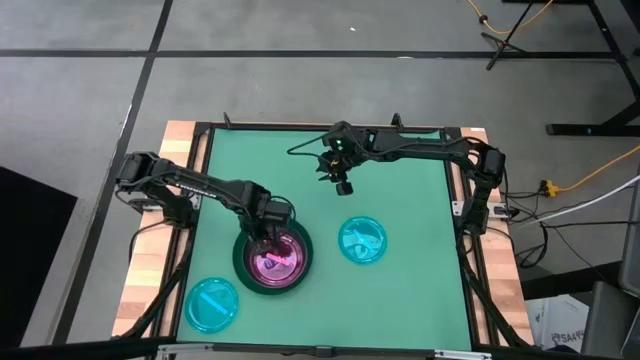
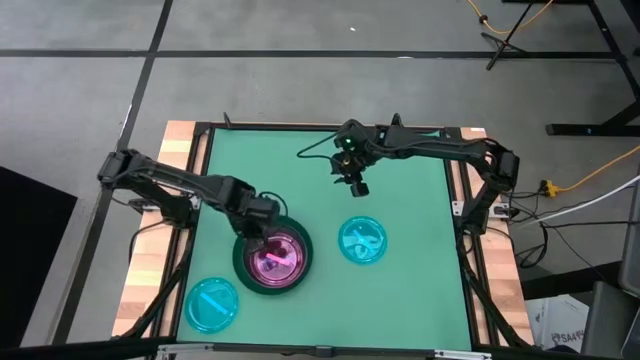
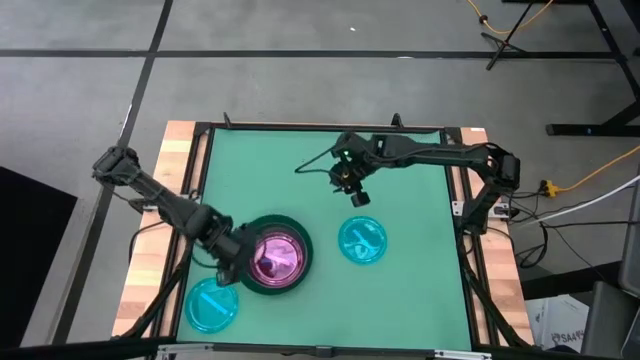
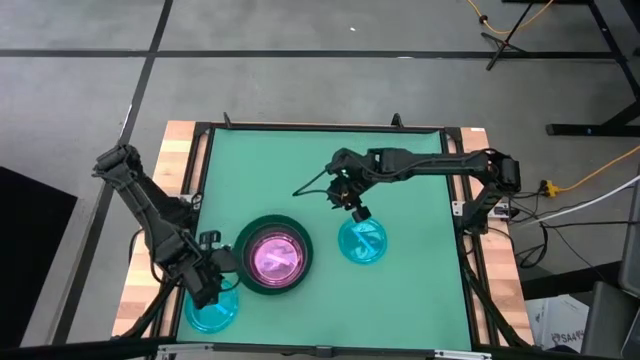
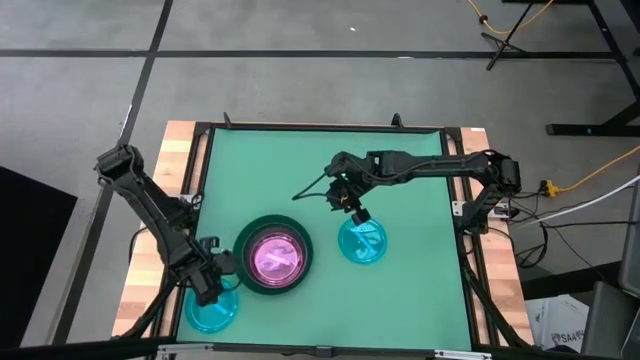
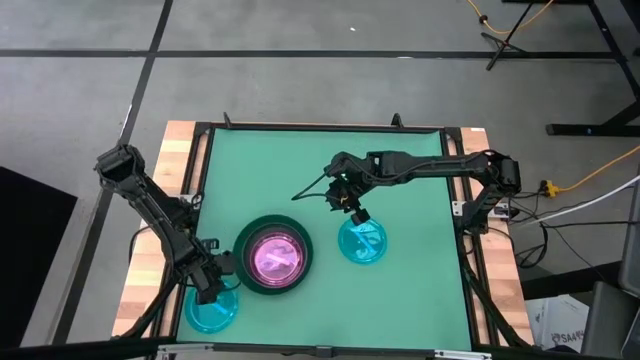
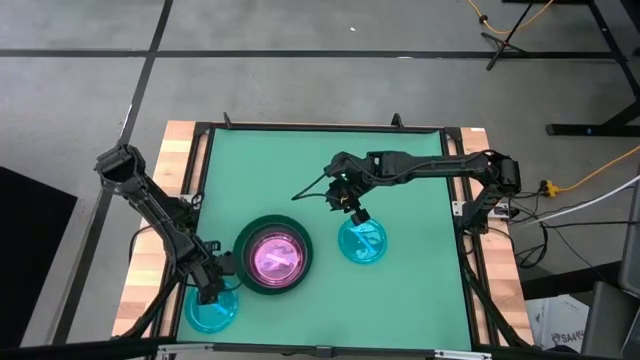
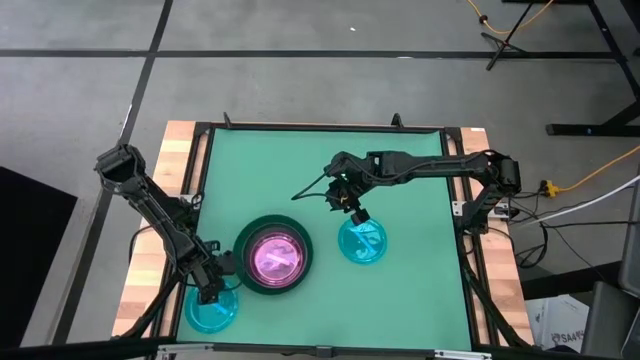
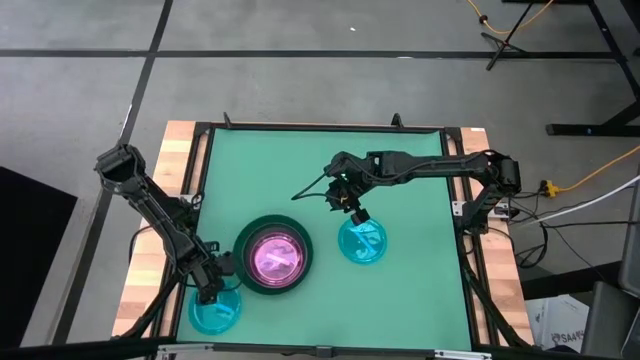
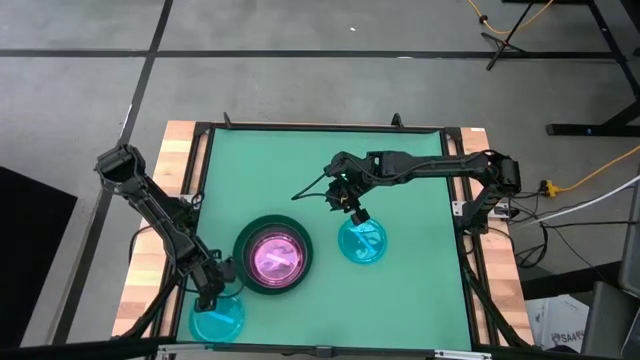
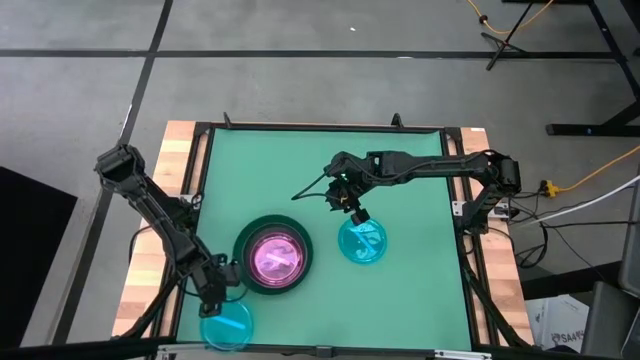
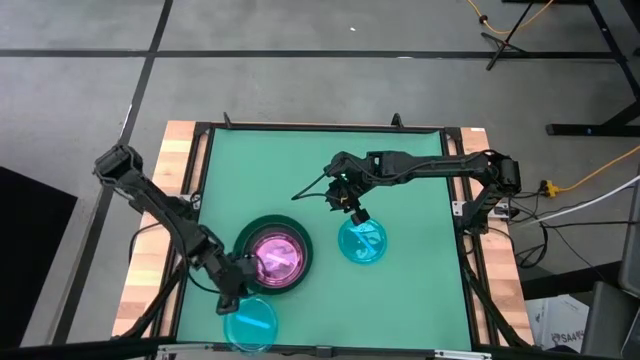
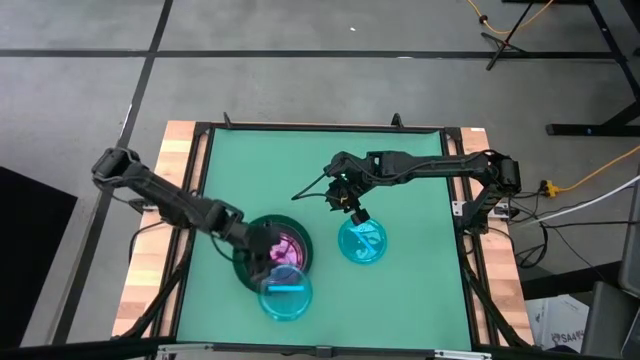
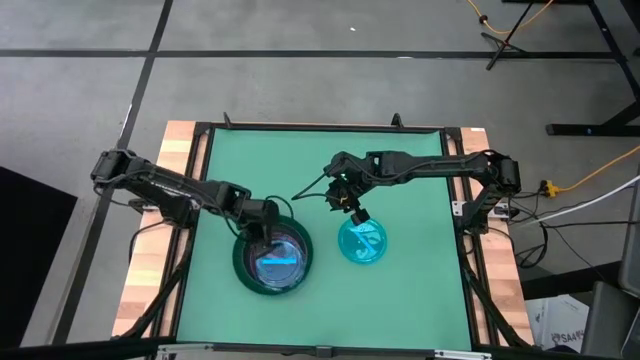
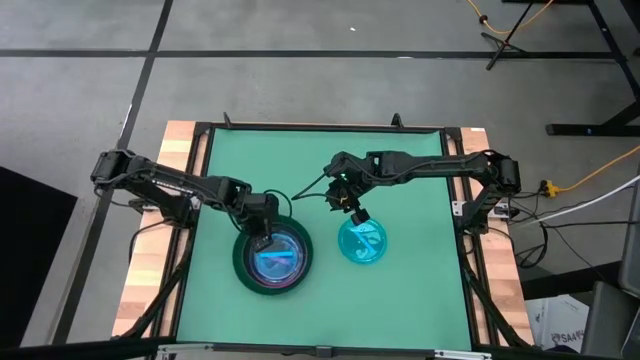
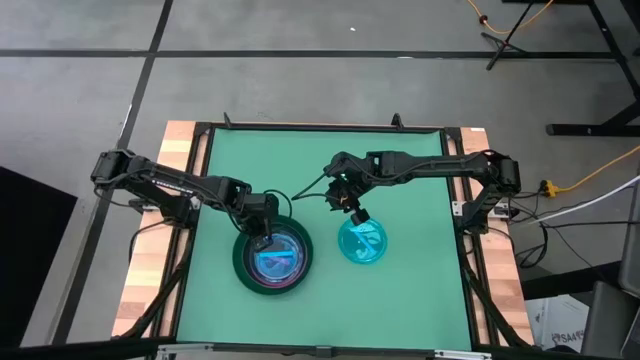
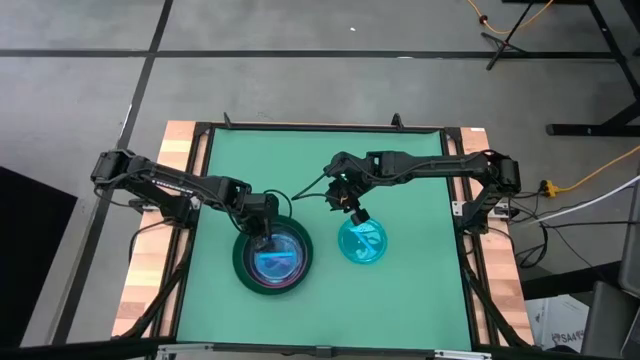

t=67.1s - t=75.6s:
Task: Stack plastic plates
Stack the bottom light blue plate on top of the light pink plate

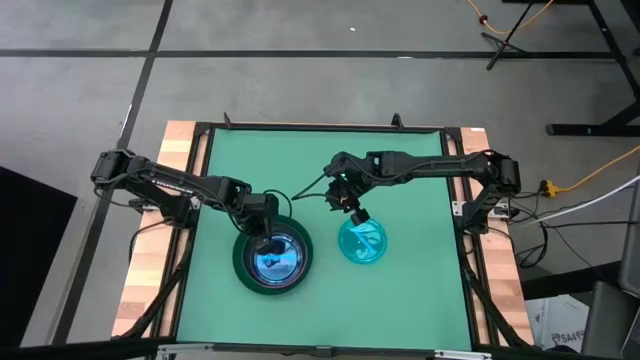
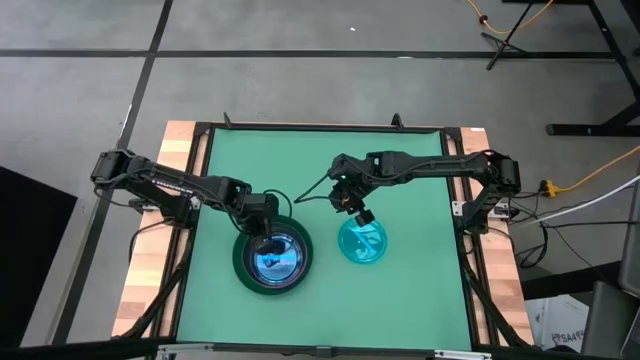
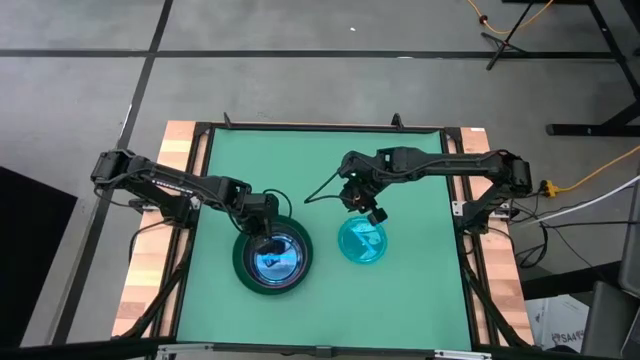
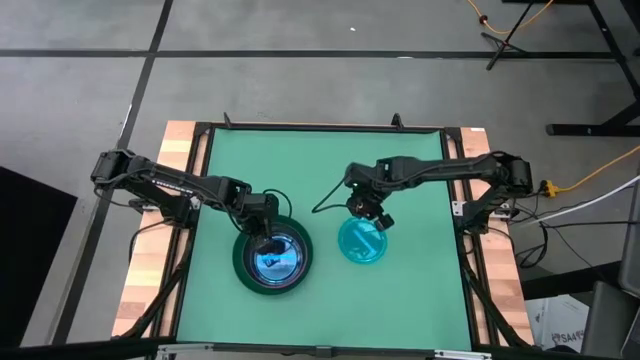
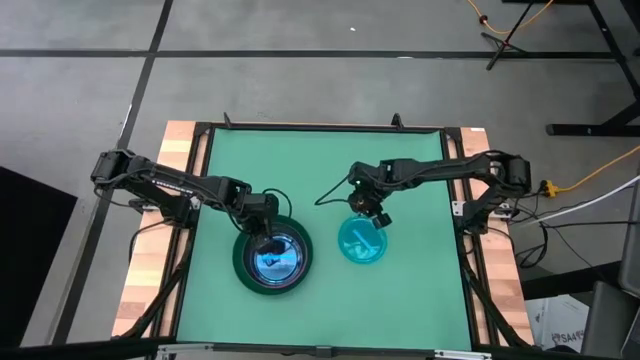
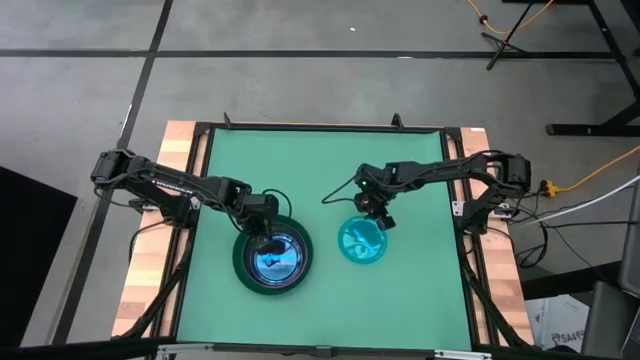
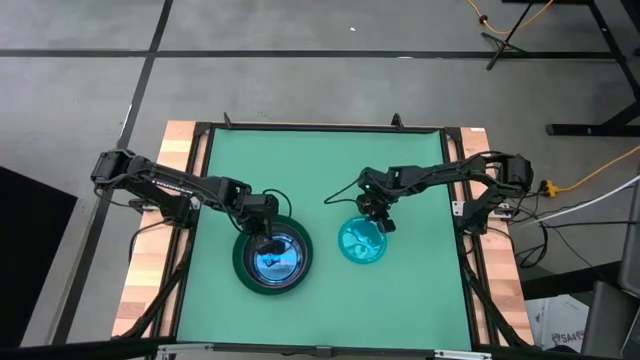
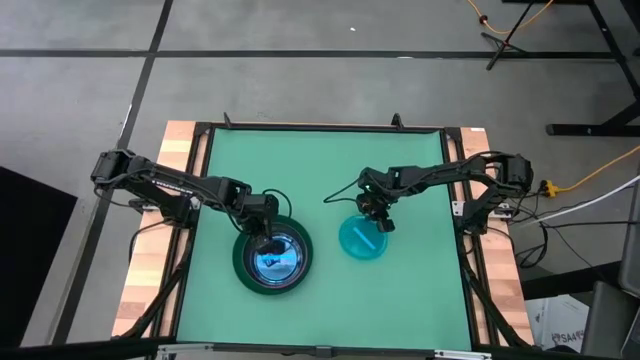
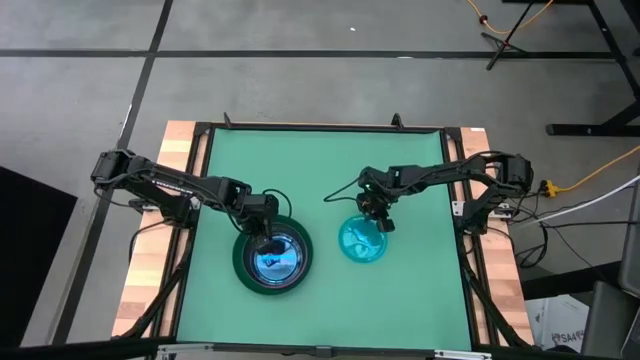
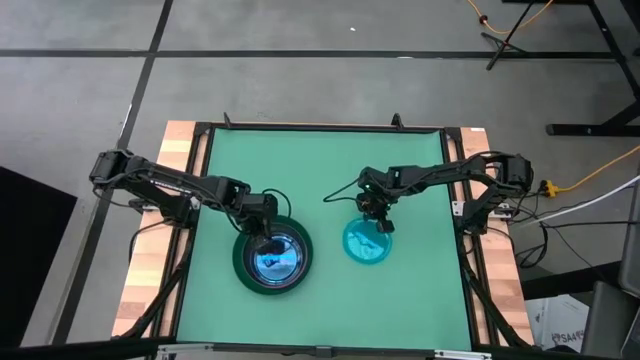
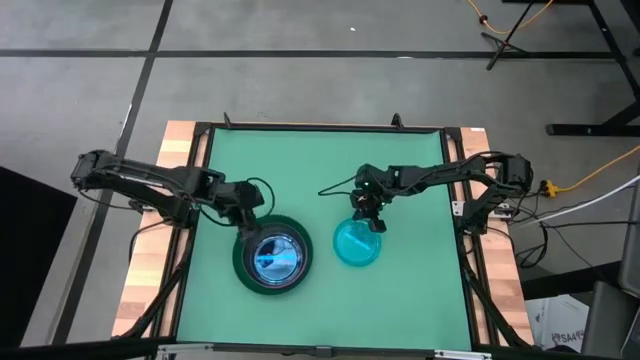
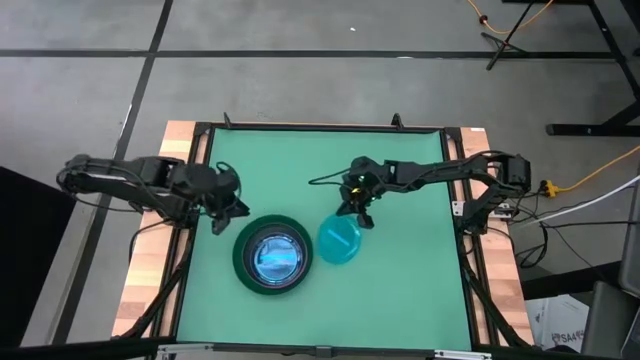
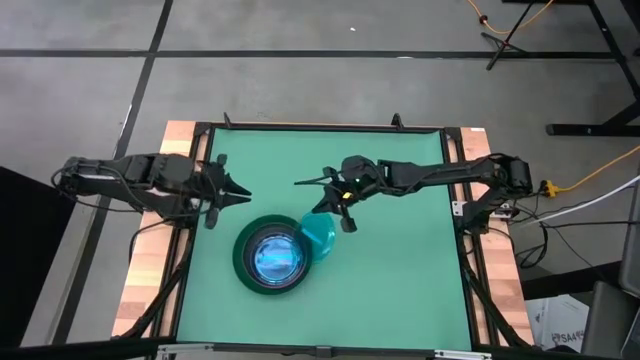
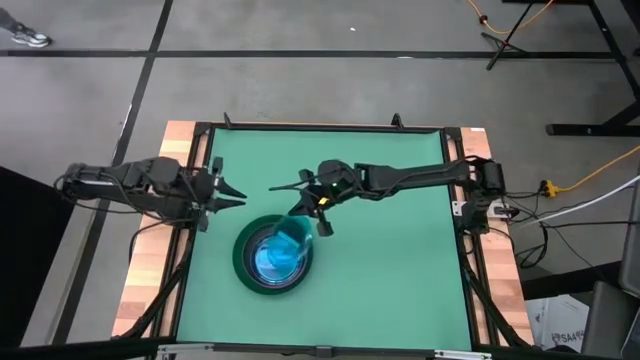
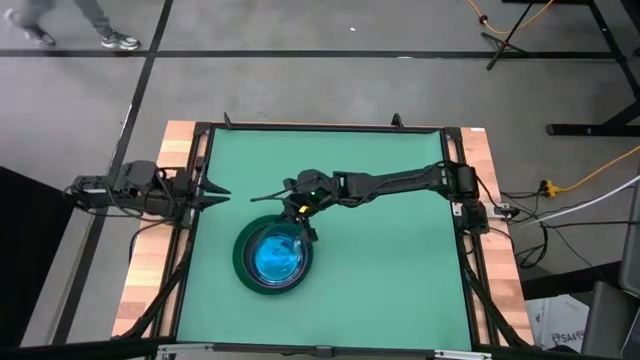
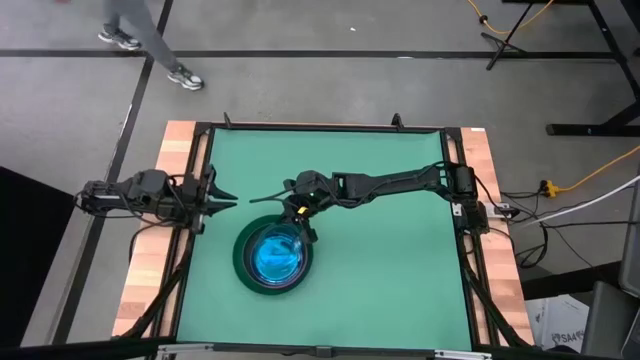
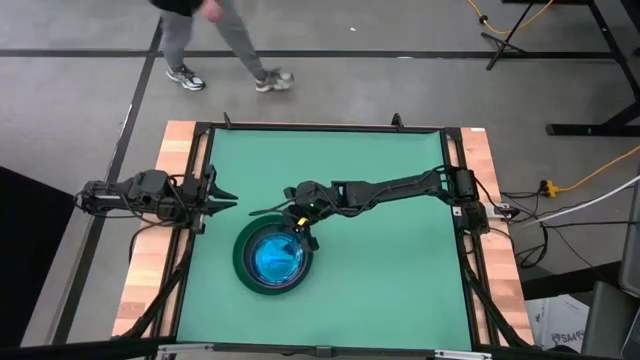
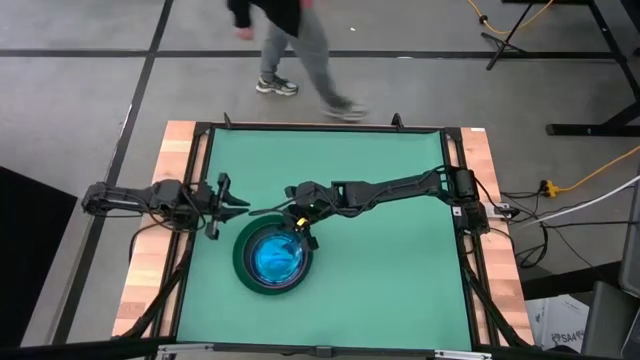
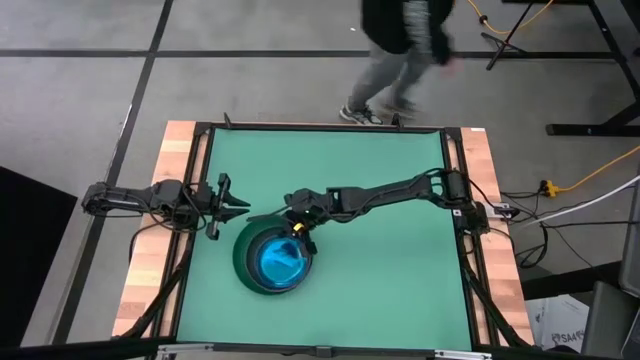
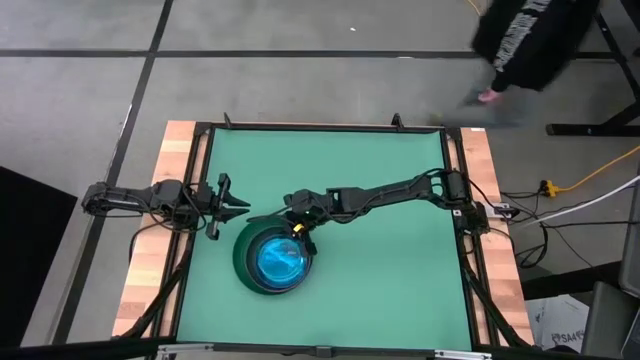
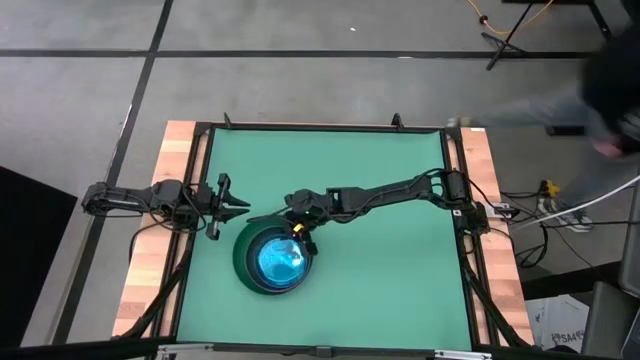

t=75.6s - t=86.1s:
Stack the light blue plate on top of the light blue plate

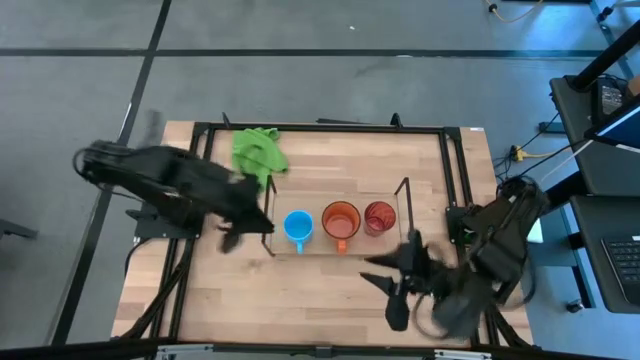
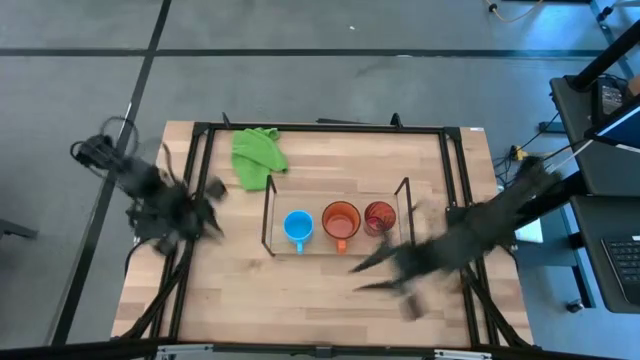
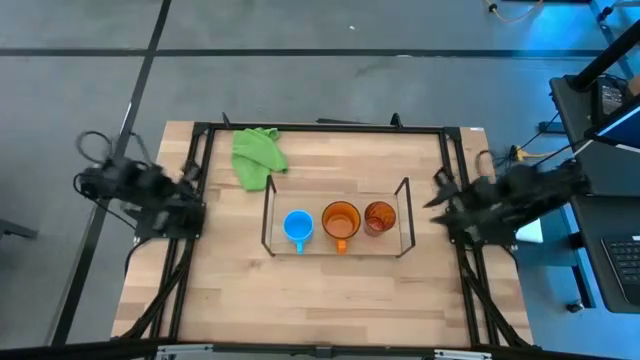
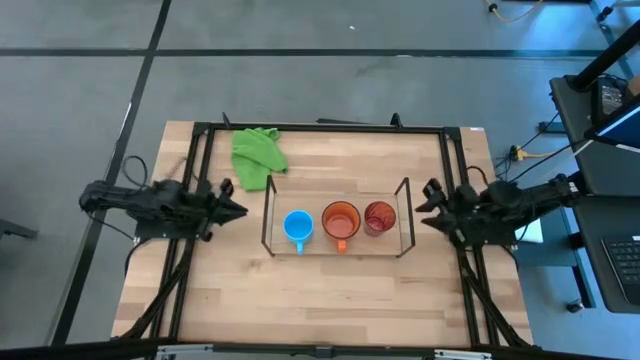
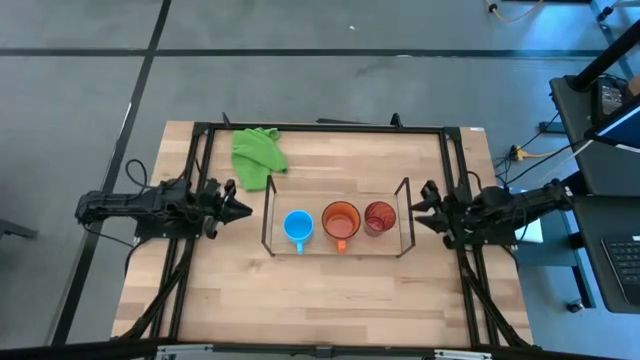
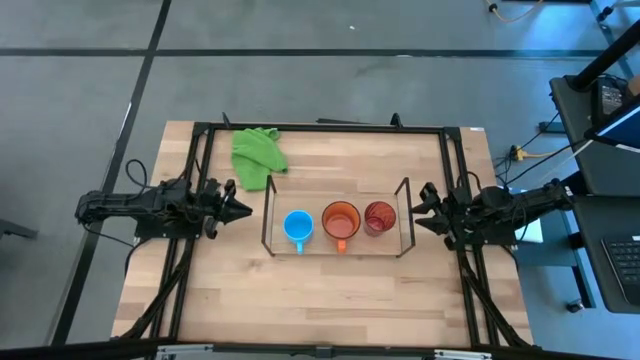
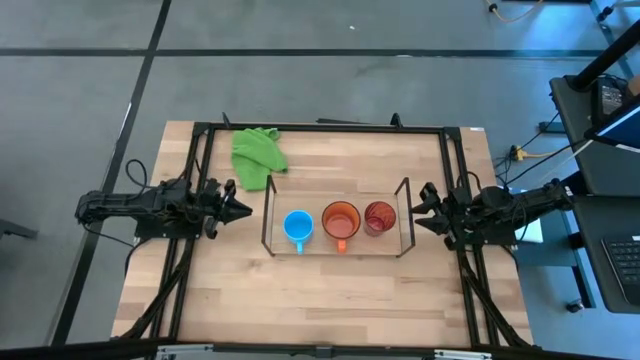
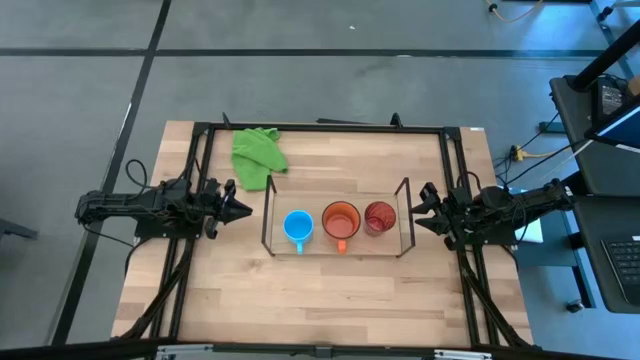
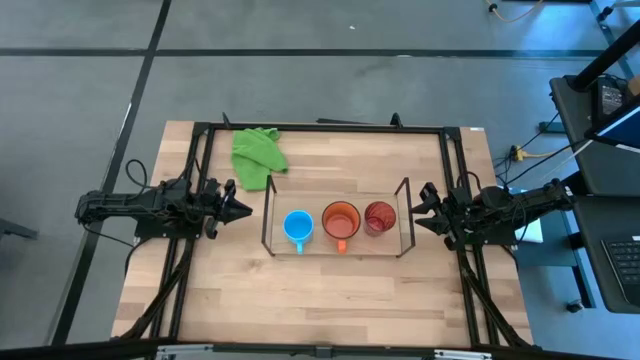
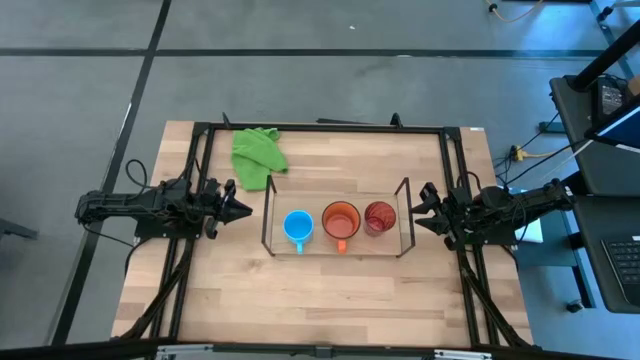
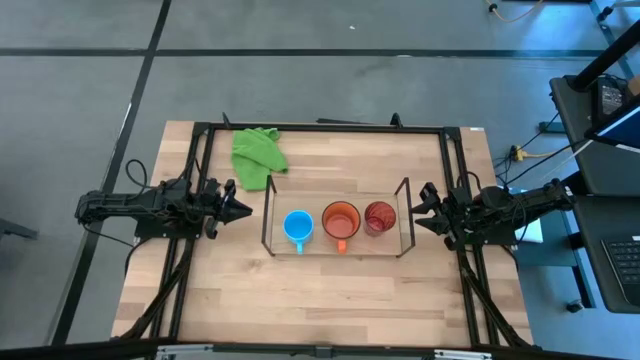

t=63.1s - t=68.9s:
Task: Stack small to large cups/mugs on shelf
Return to Home Position
